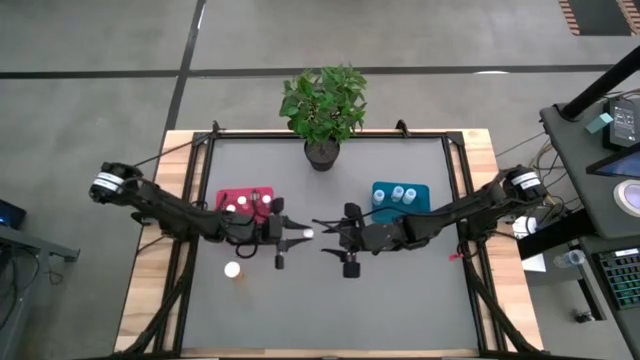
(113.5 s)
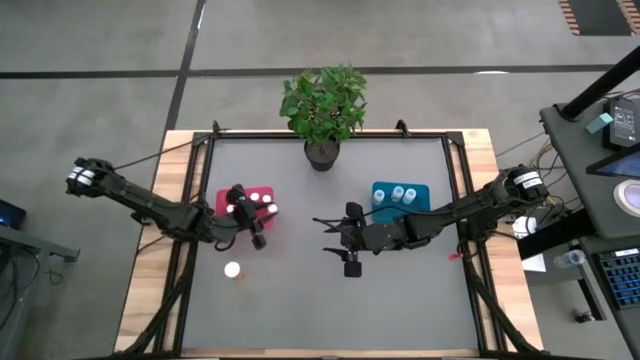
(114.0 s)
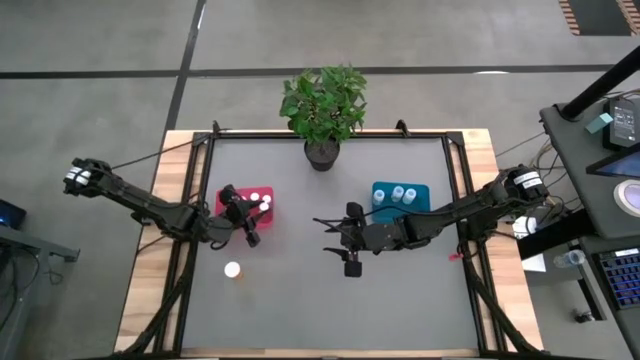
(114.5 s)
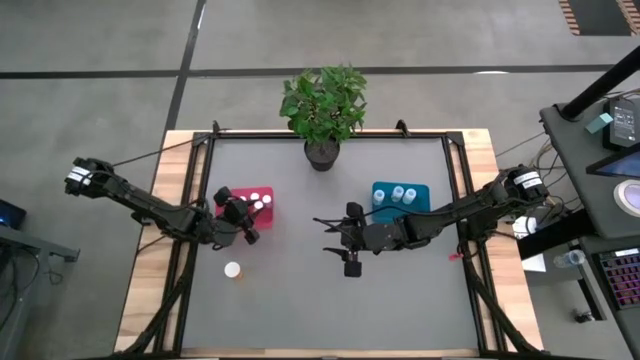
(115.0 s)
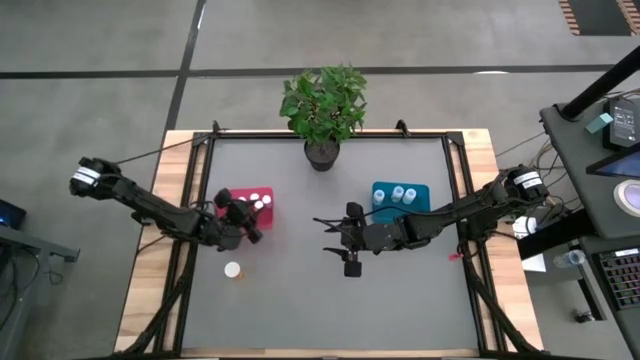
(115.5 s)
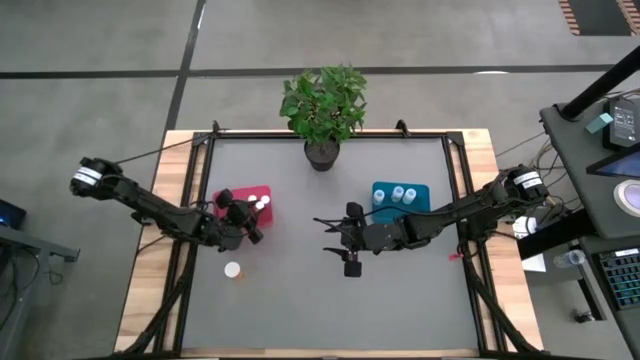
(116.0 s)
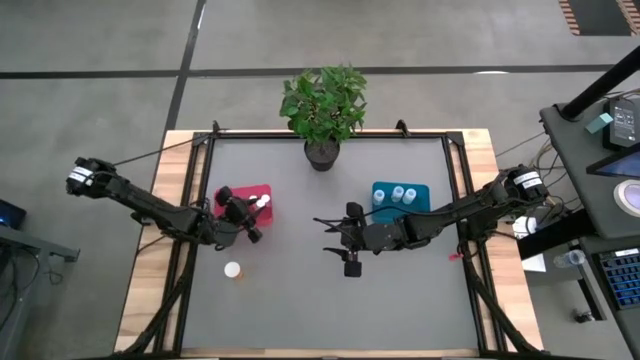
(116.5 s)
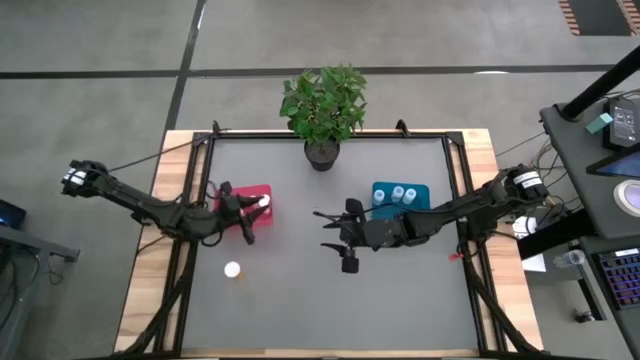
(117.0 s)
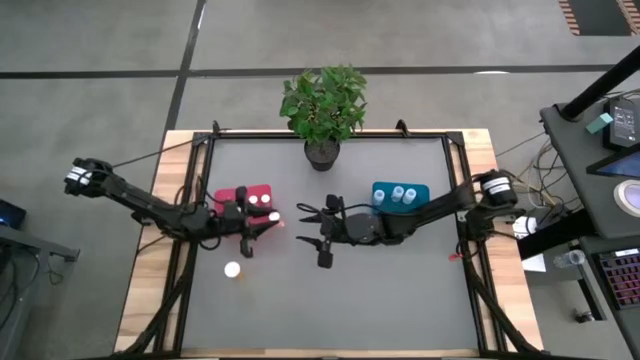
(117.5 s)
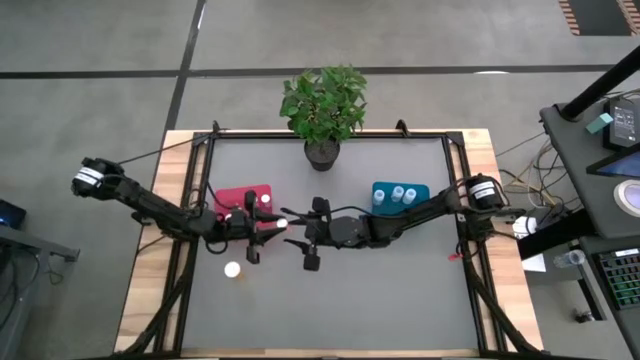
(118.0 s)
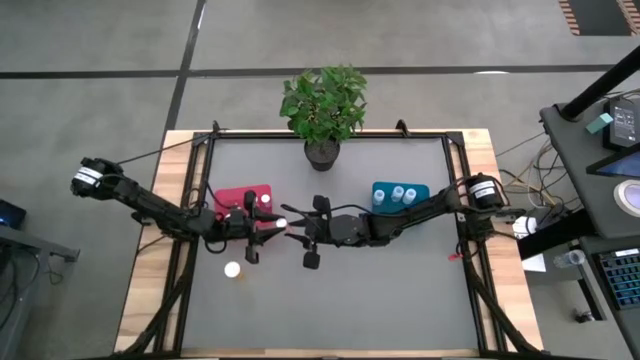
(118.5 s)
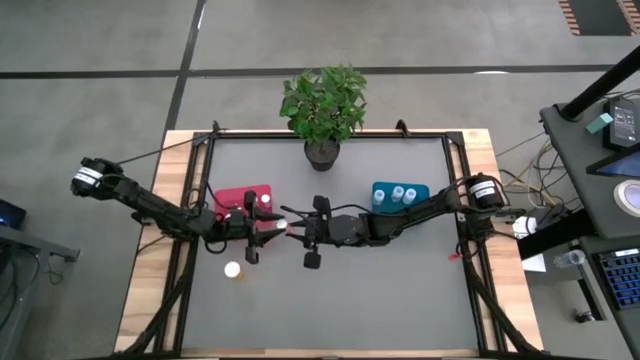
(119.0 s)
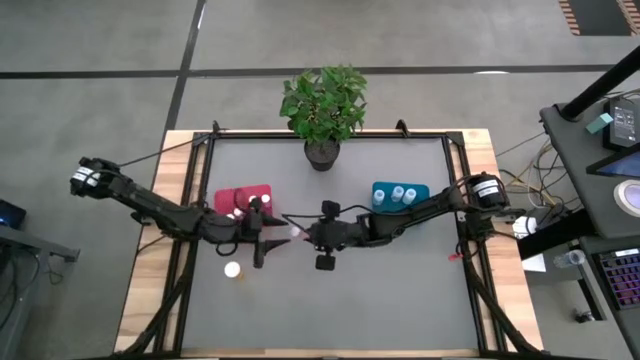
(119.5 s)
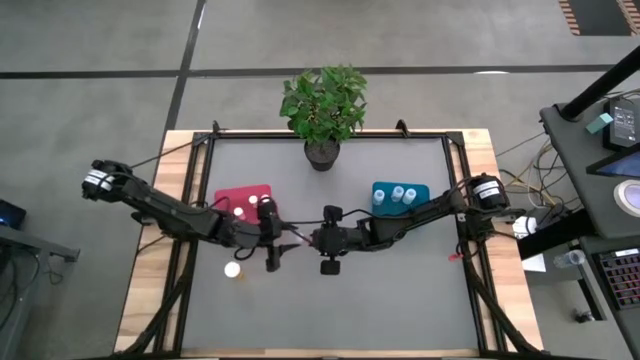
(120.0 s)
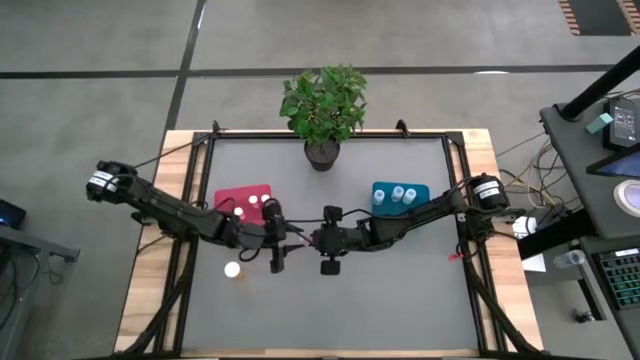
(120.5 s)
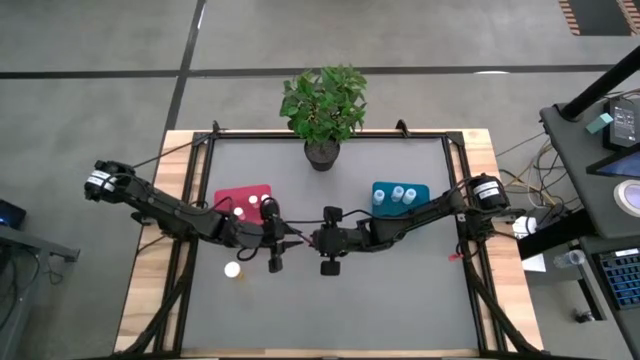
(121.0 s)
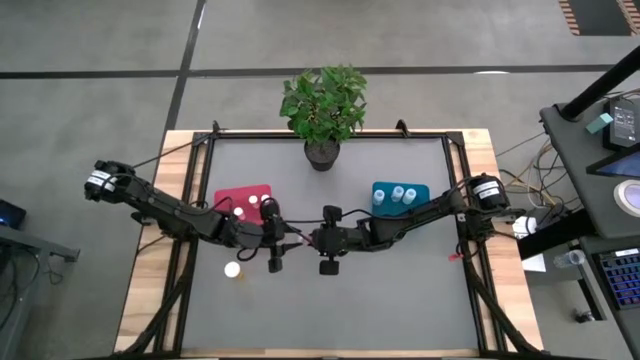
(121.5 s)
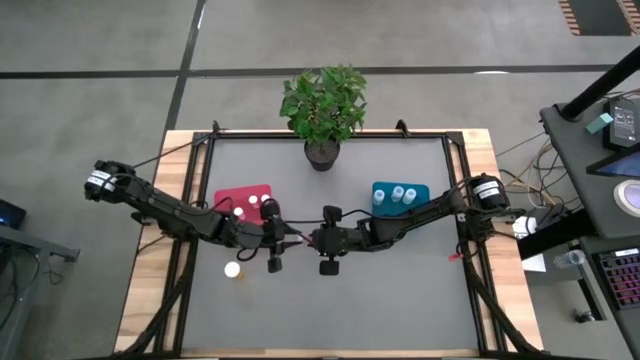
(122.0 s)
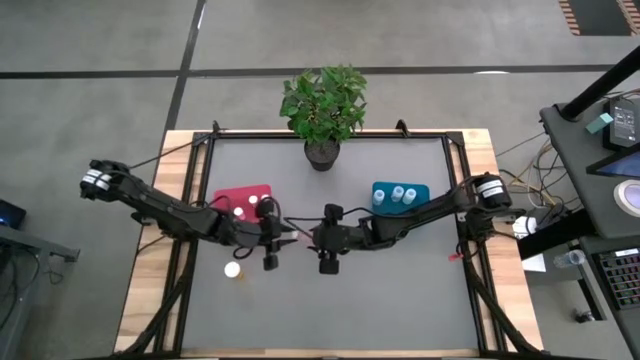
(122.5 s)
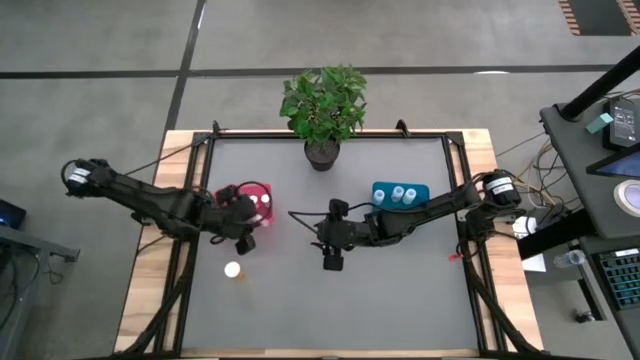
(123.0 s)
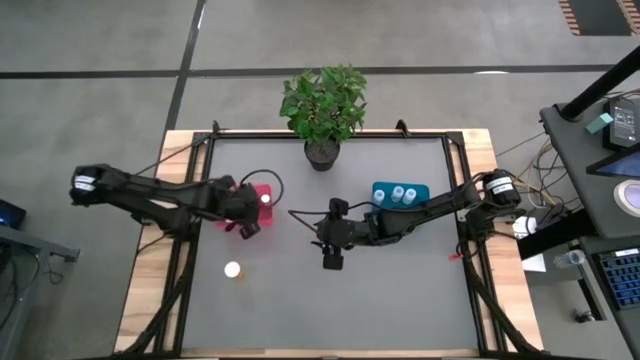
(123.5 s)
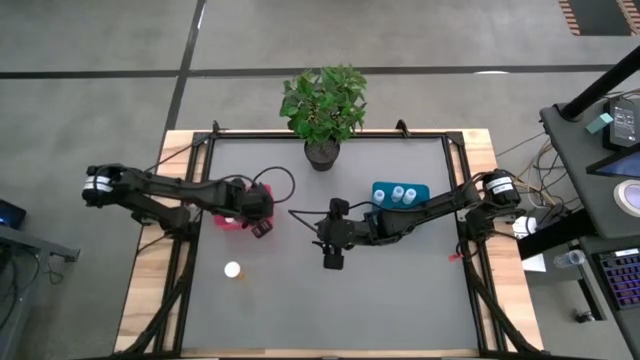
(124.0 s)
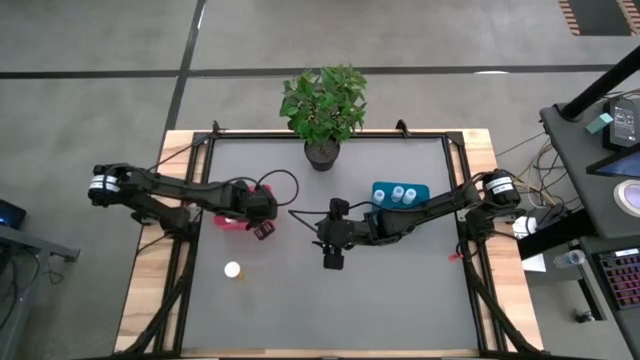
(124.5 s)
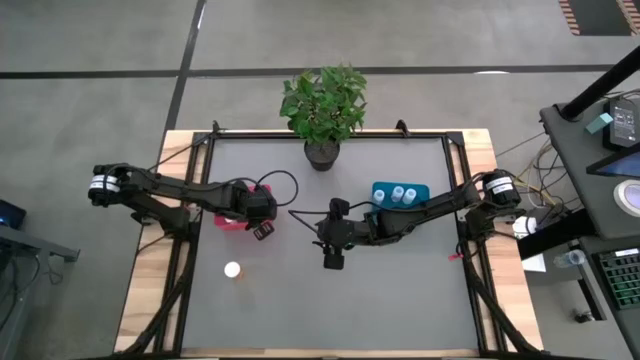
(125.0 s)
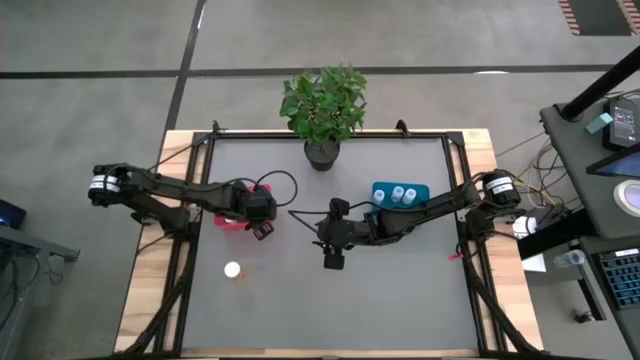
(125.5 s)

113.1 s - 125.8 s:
Task: Pick and place medicine bottles into bin by pill shape (circle, oval)
Put the orange table bottle into the red bin

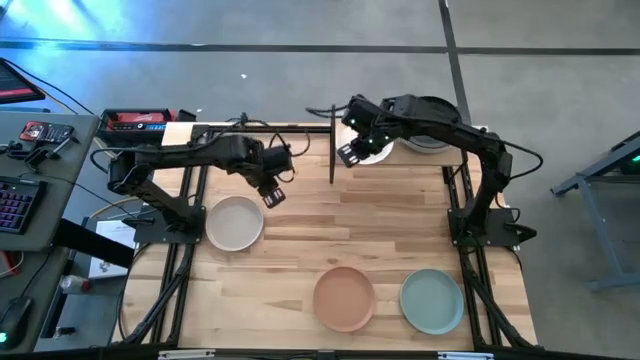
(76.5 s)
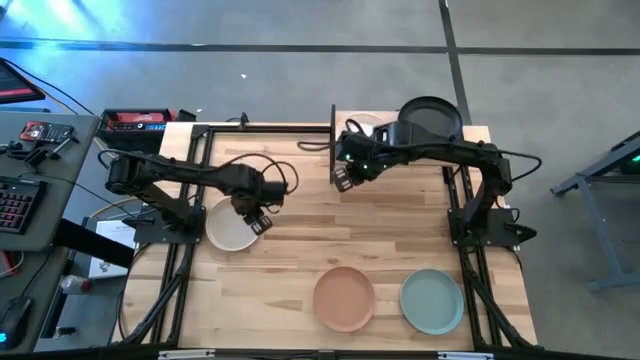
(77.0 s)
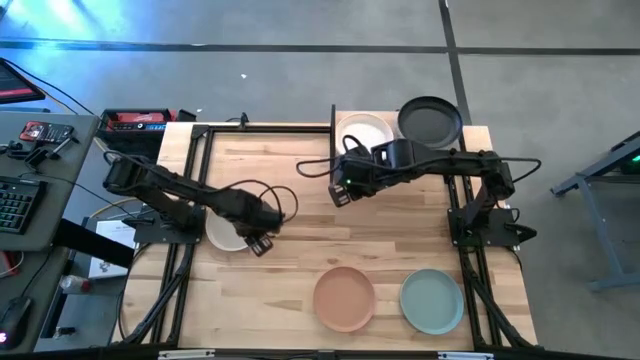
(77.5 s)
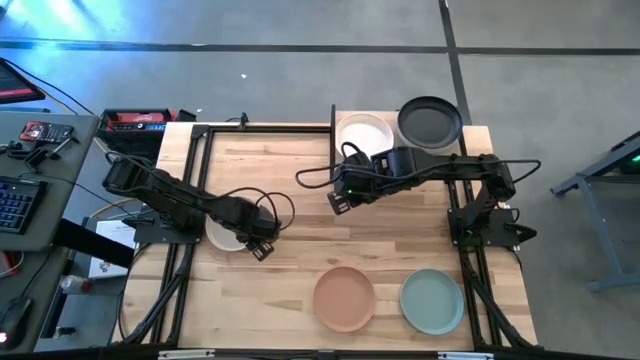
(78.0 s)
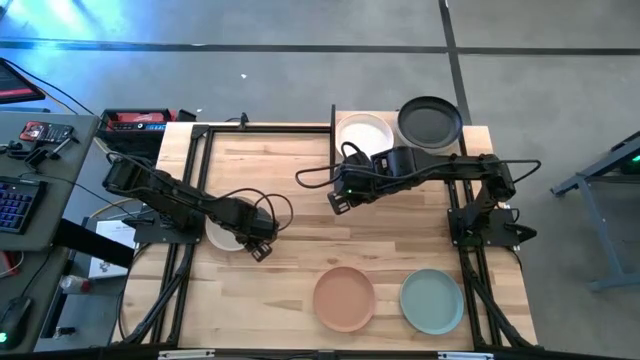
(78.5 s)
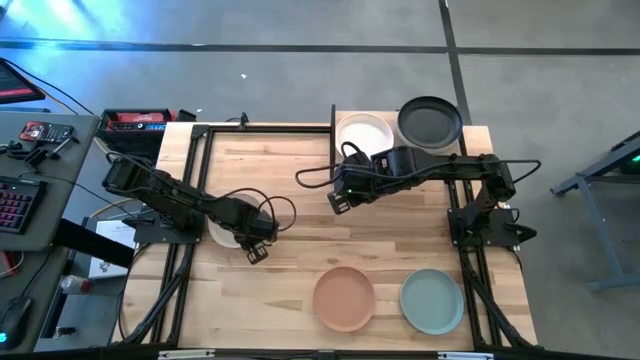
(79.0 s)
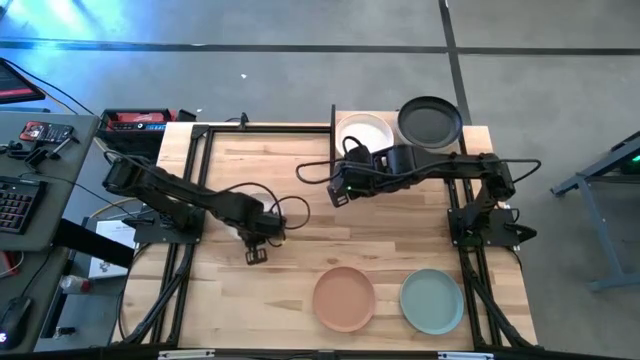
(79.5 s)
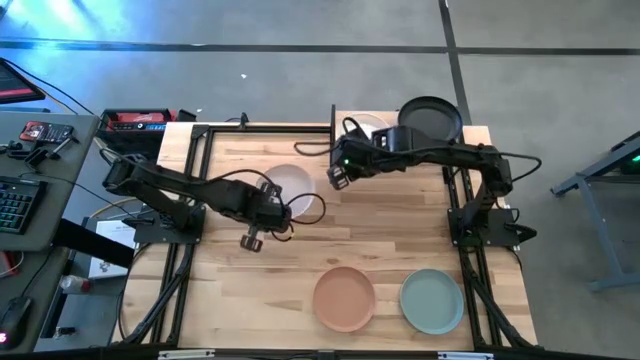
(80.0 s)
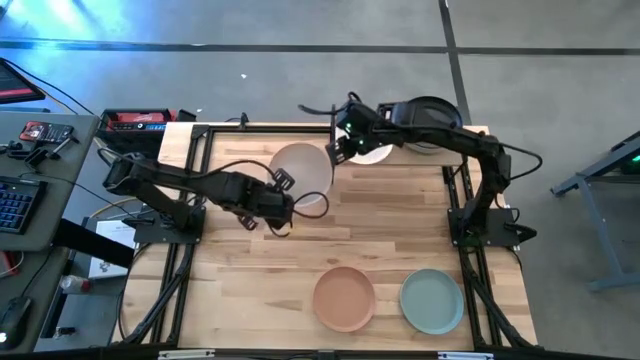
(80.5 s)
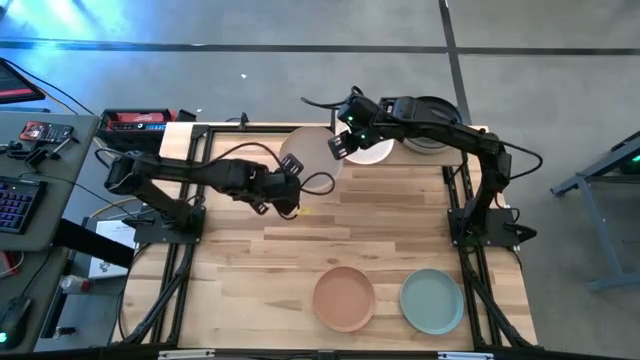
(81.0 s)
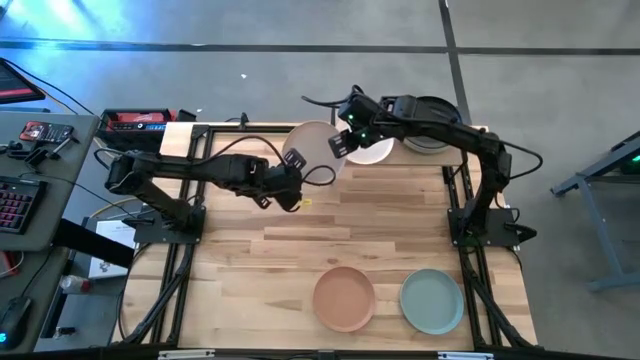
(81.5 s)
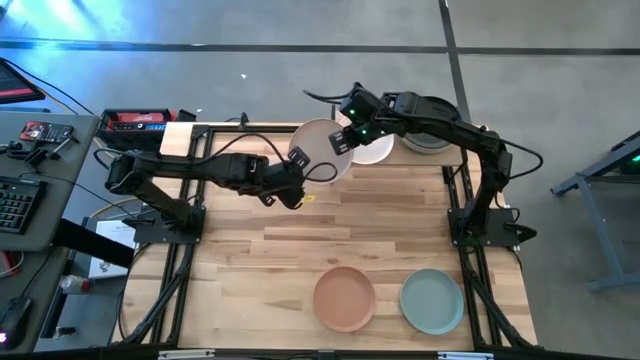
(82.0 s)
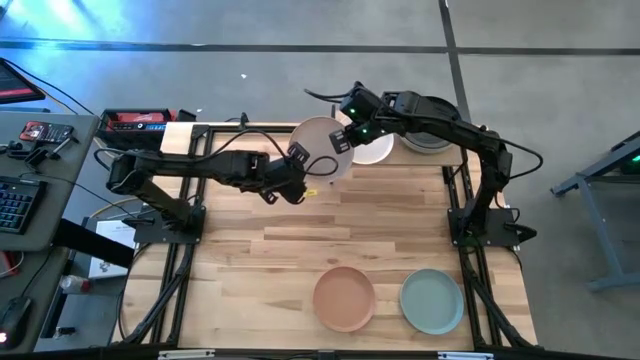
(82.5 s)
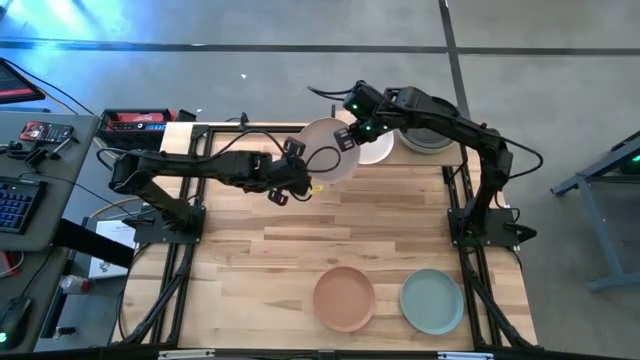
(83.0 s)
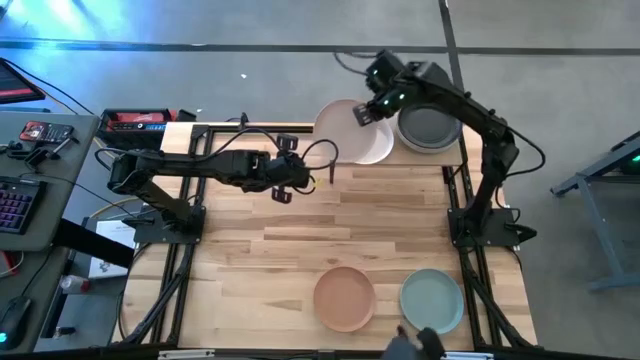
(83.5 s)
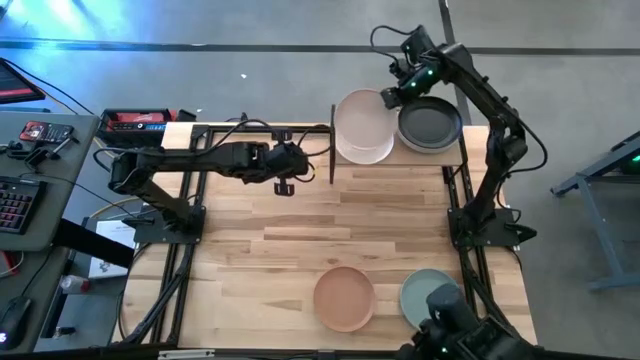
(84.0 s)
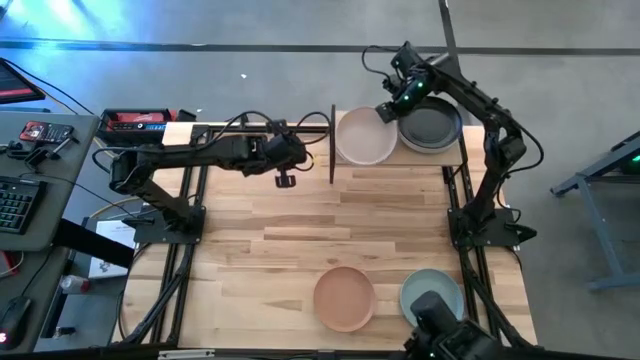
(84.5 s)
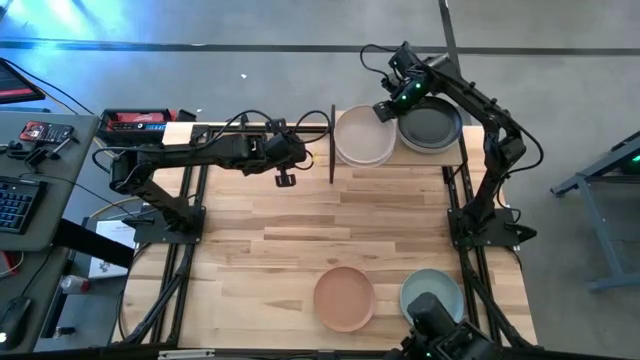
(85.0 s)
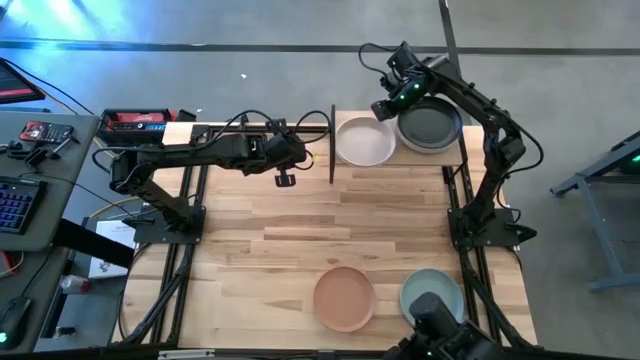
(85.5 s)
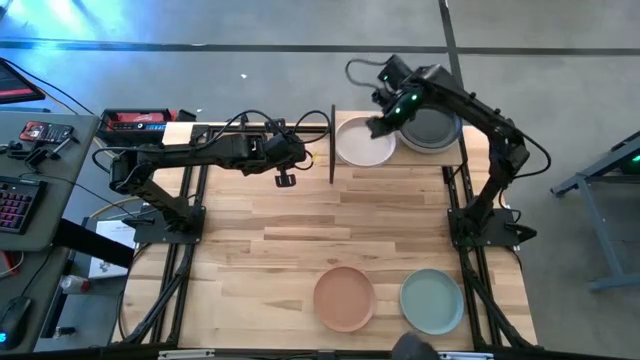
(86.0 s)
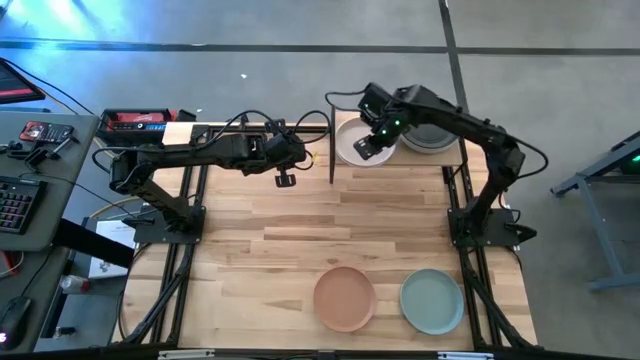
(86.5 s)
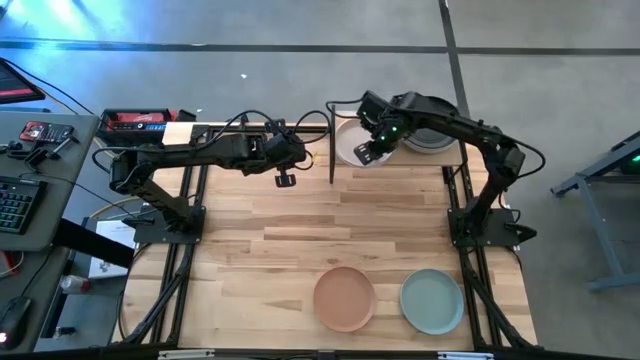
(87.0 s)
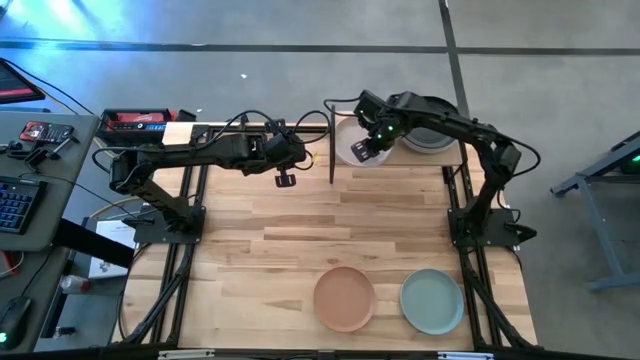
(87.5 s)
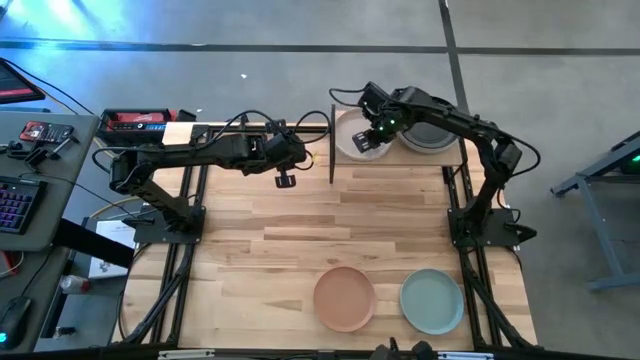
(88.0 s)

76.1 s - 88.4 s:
Task: Place and stack plates onto a shelf
Stack the gray plate on top of the white plate on the shelf
